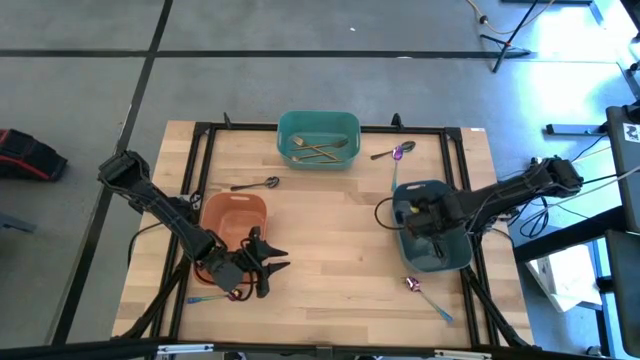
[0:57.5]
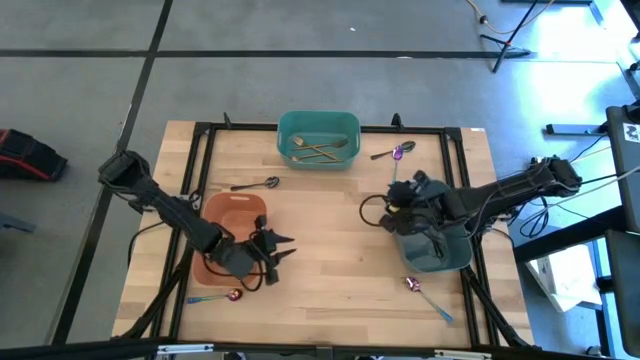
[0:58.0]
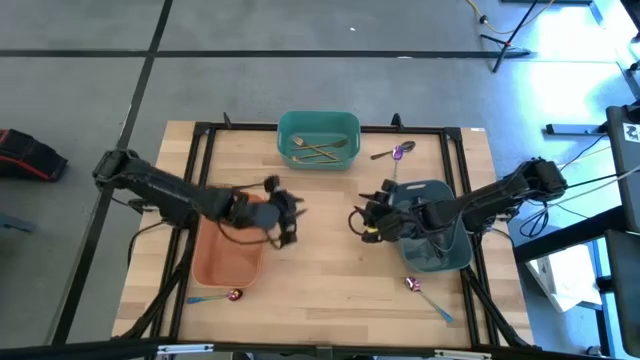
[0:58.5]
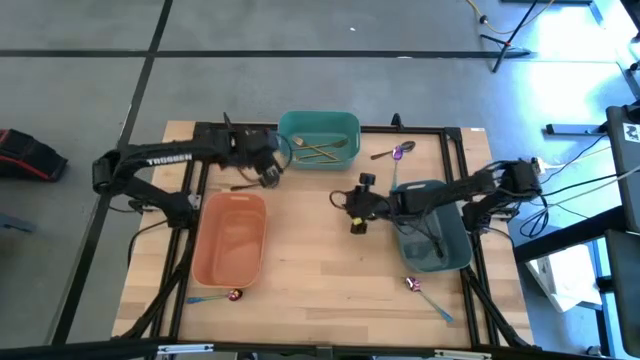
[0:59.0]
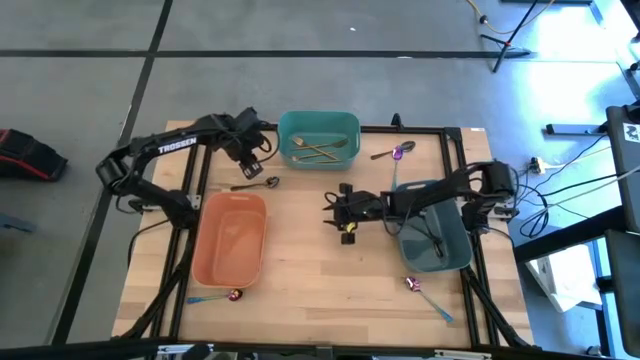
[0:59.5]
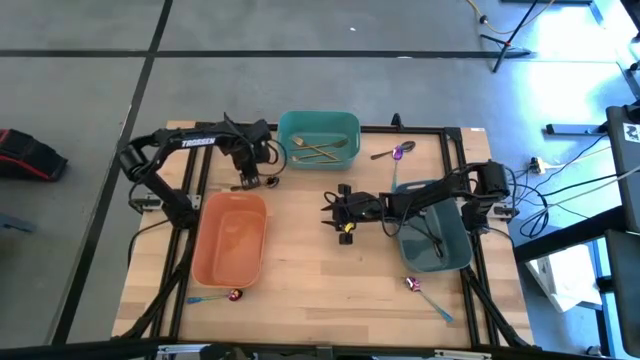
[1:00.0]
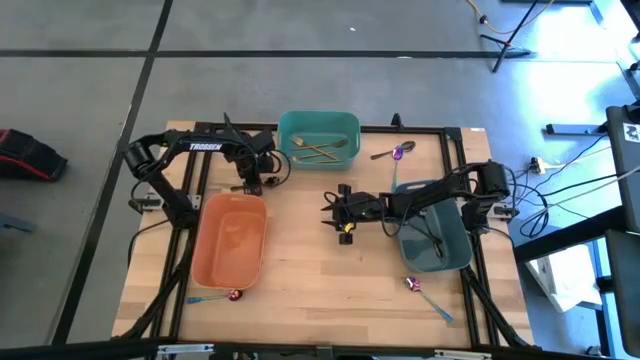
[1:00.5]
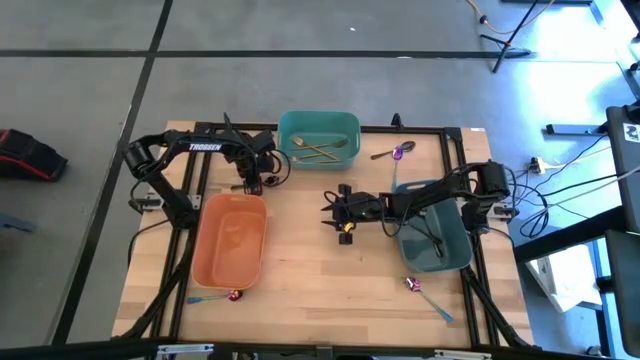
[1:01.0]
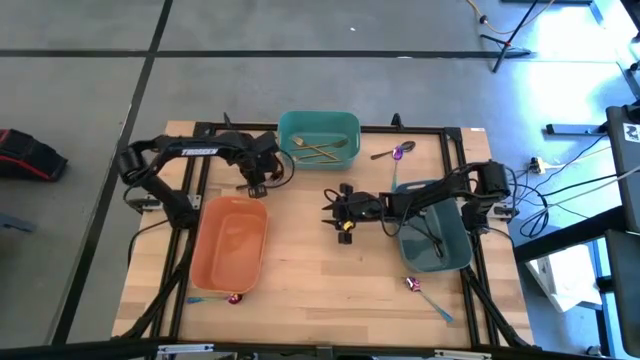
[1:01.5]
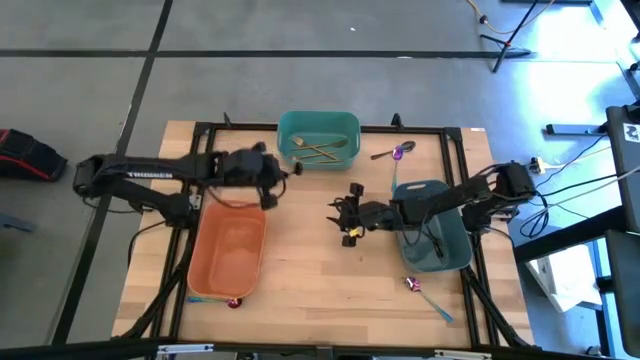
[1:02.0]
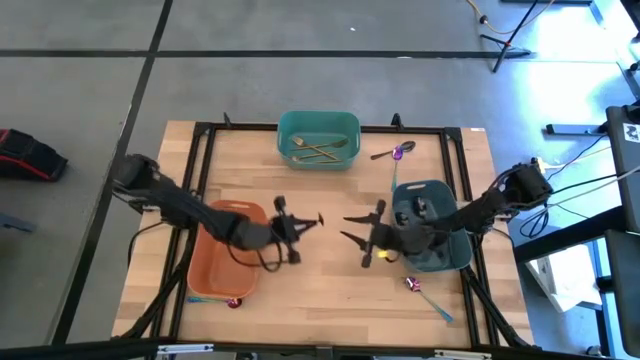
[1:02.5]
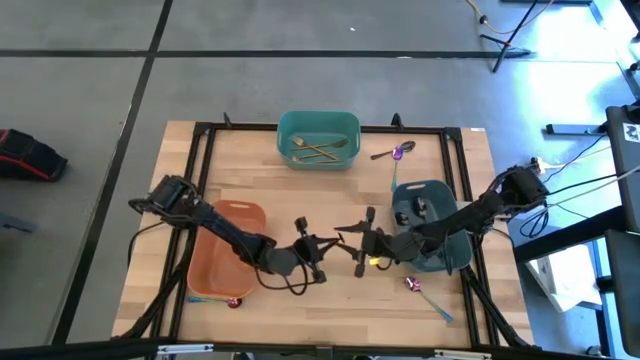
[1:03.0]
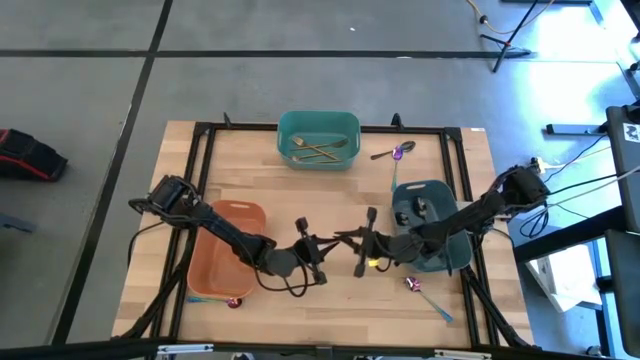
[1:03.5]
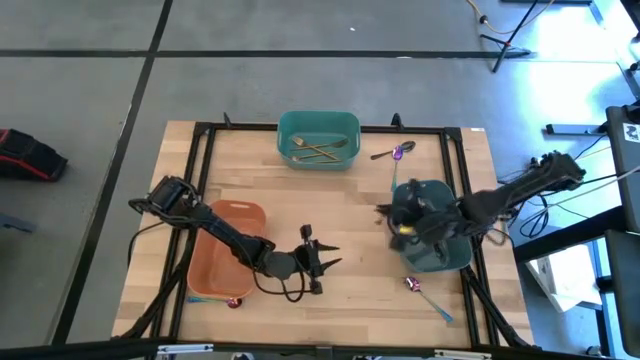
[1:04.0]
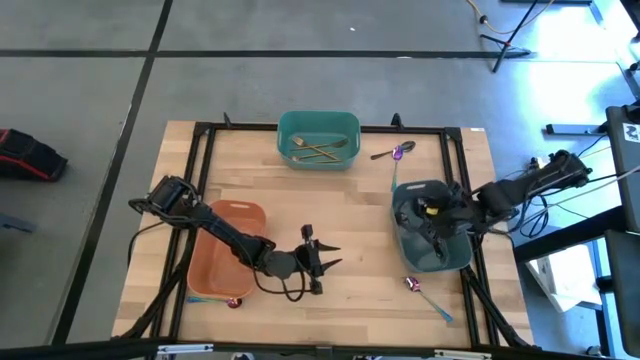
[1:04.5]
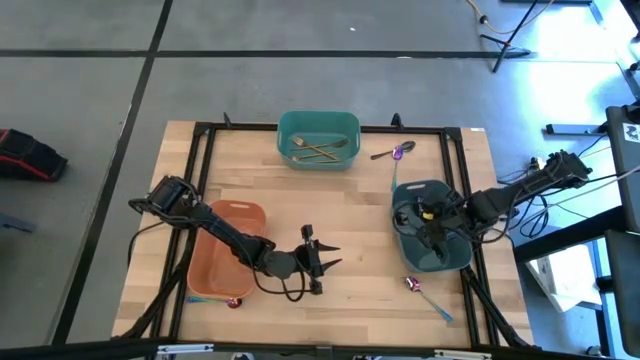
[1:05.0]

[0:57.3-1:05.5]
Task: Sort silverware by color (type)
Put the black spoon into the blue bin

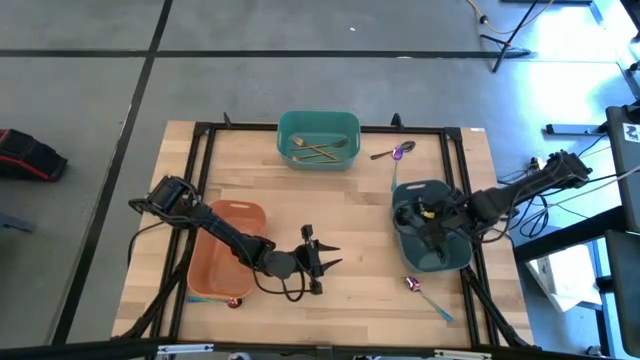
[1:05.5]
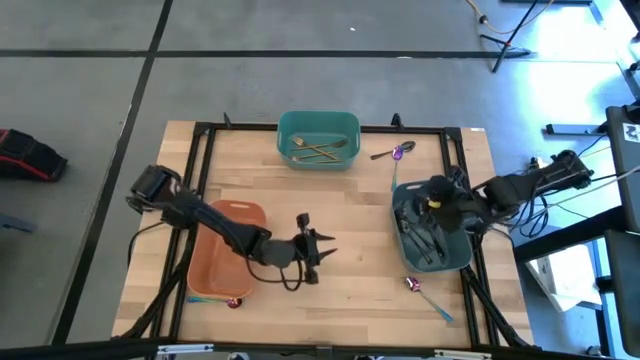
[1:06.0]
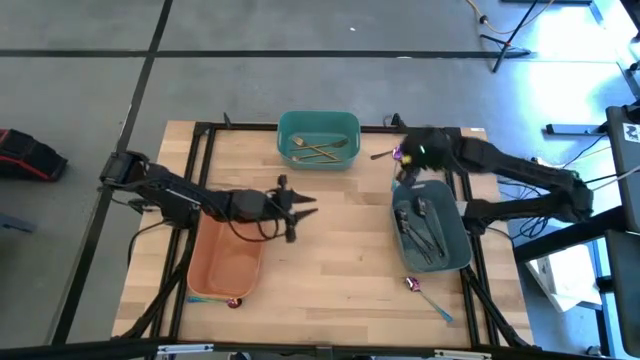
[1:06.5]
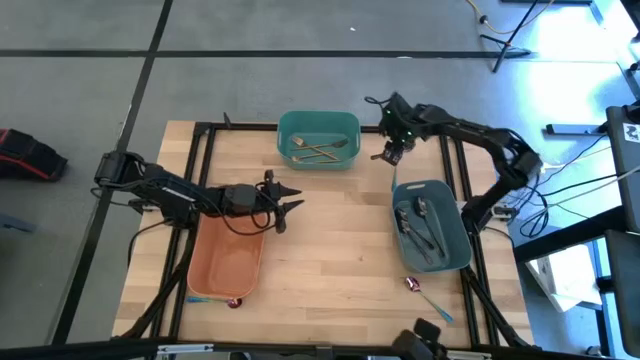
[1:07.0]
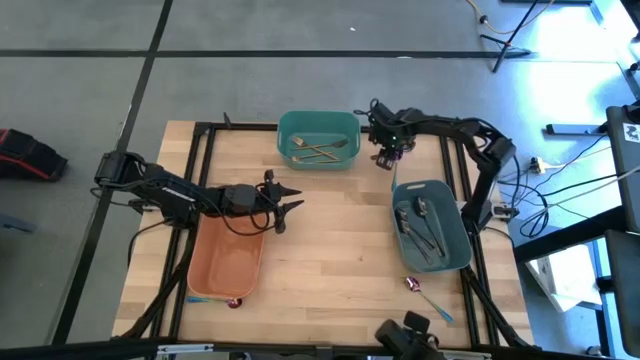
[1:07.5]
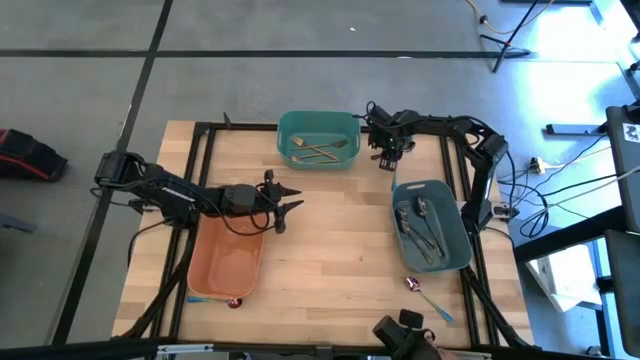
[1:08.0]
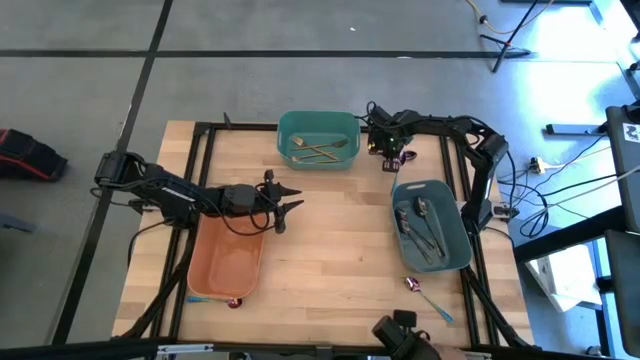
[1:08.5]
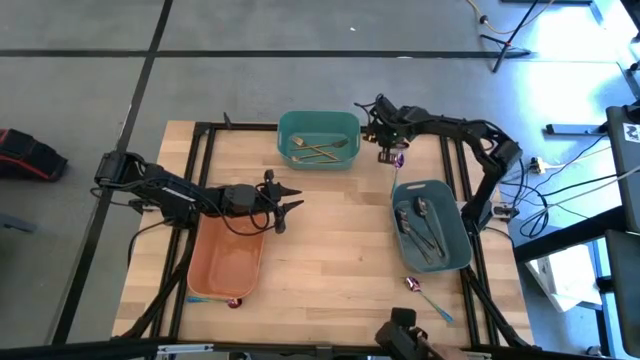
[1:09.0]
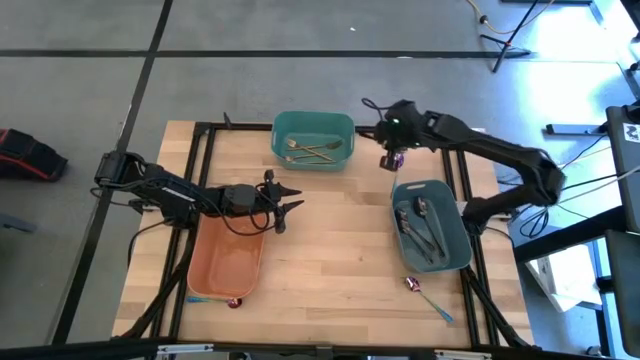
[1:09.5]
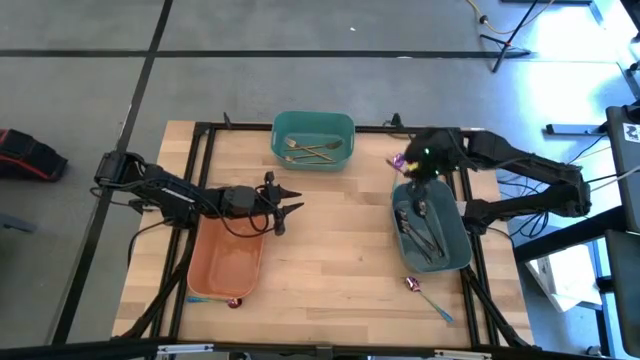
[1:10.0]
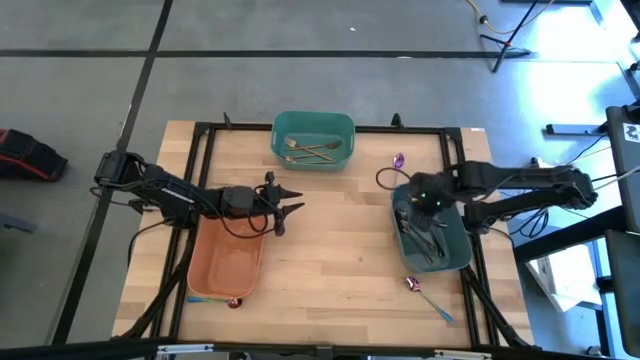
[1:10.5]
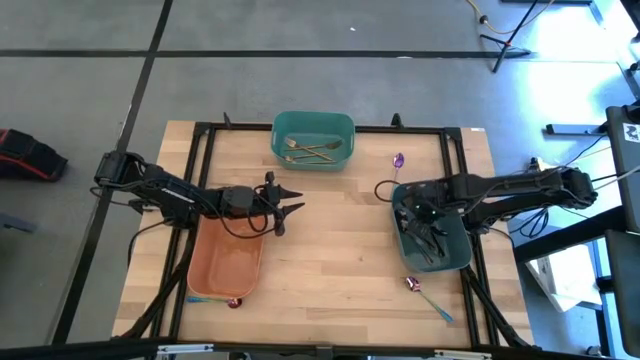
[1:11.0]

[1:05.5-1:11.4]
Put the black spoon into the blue bin

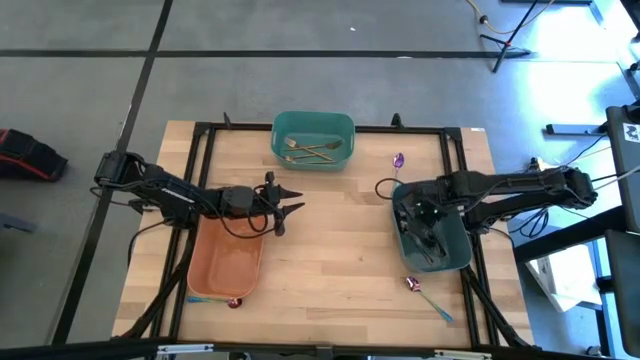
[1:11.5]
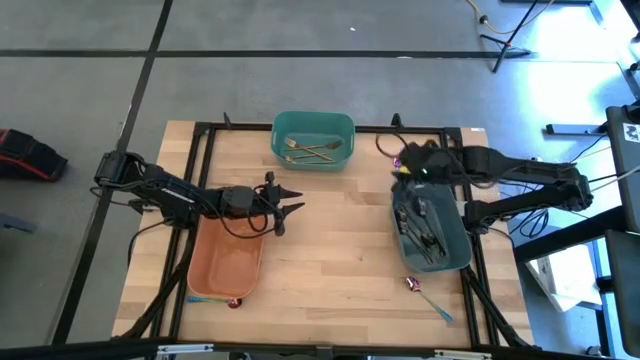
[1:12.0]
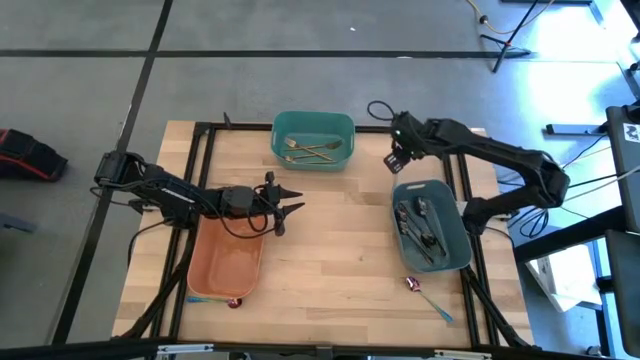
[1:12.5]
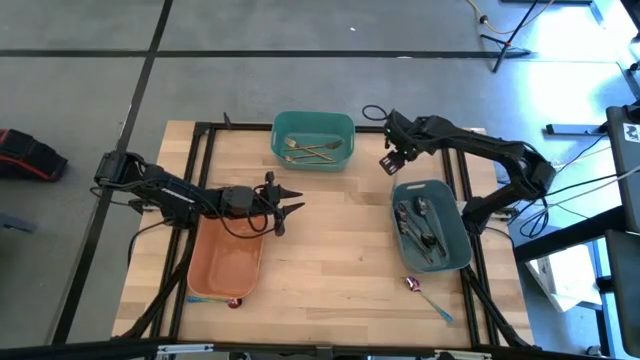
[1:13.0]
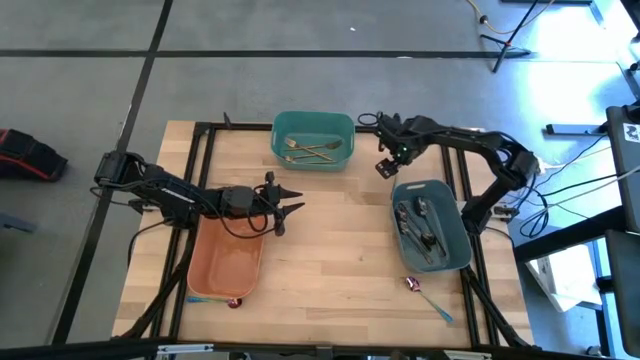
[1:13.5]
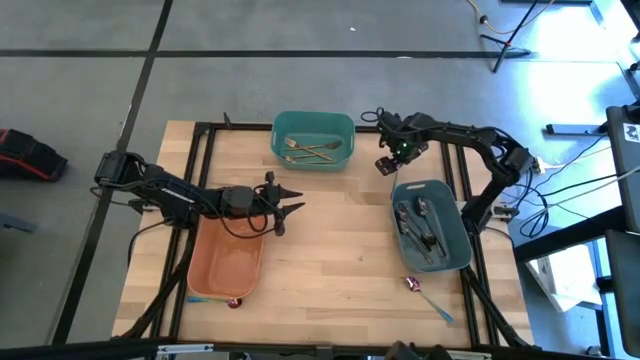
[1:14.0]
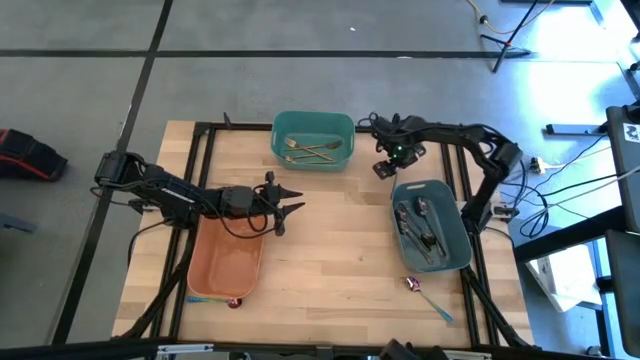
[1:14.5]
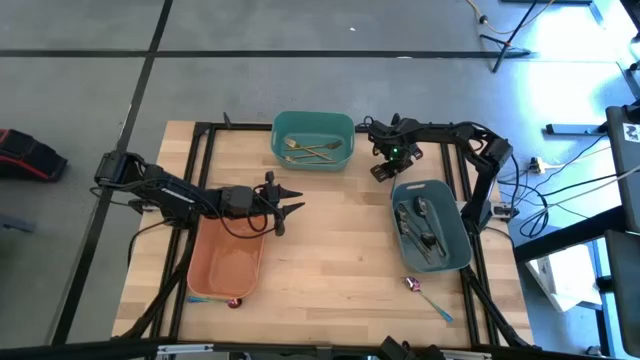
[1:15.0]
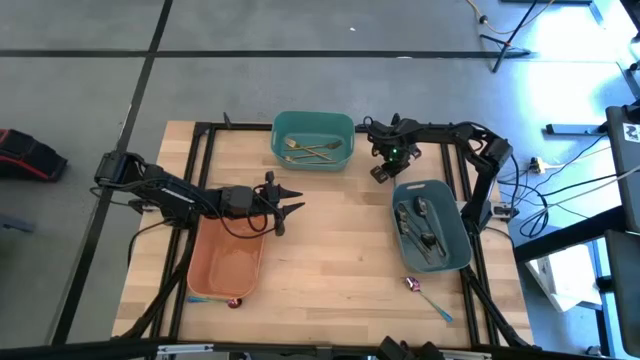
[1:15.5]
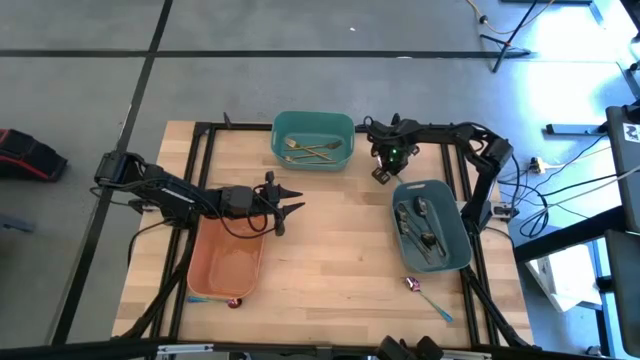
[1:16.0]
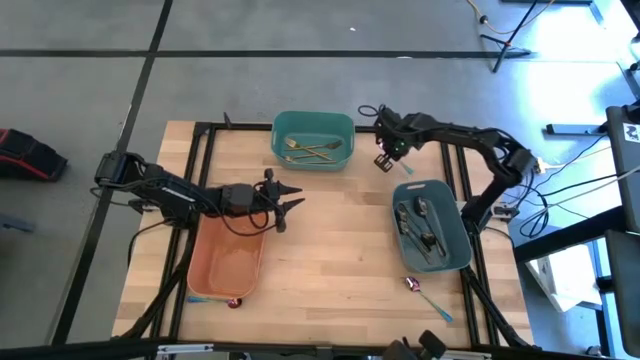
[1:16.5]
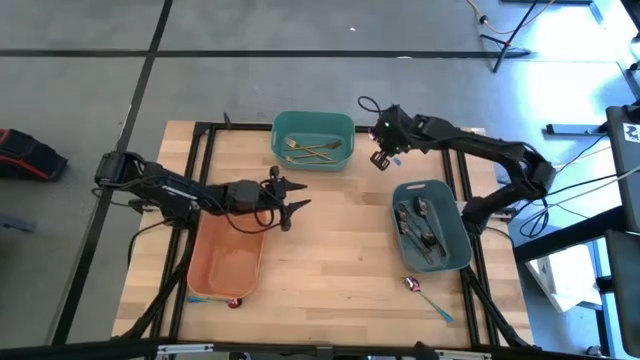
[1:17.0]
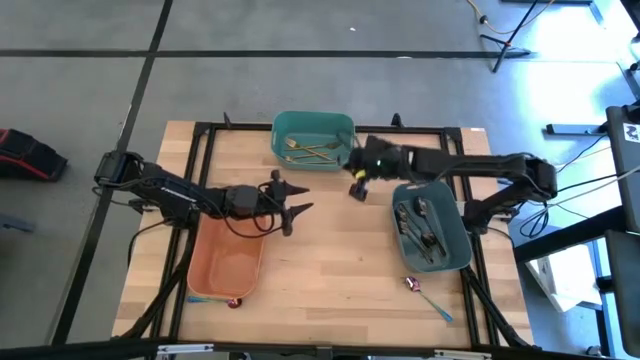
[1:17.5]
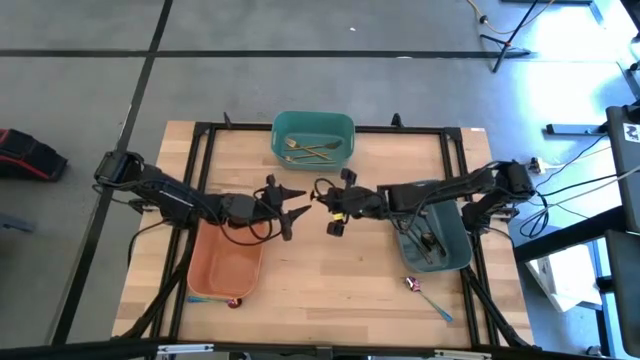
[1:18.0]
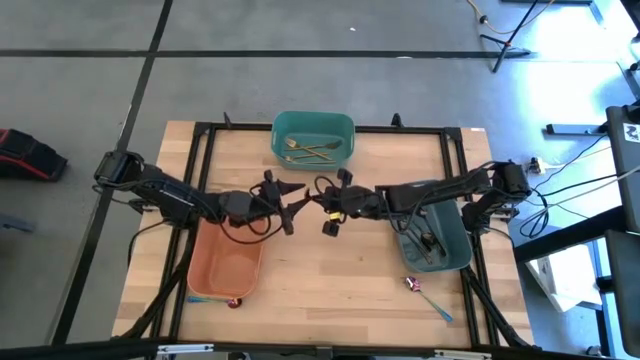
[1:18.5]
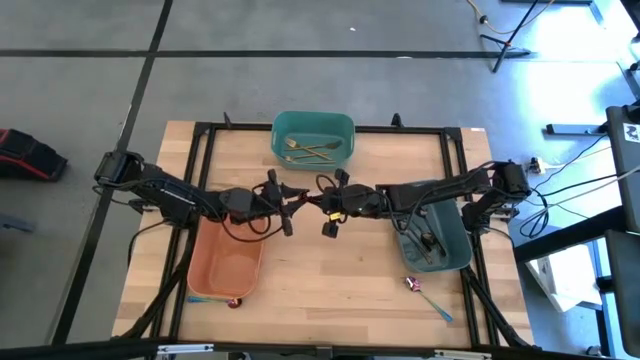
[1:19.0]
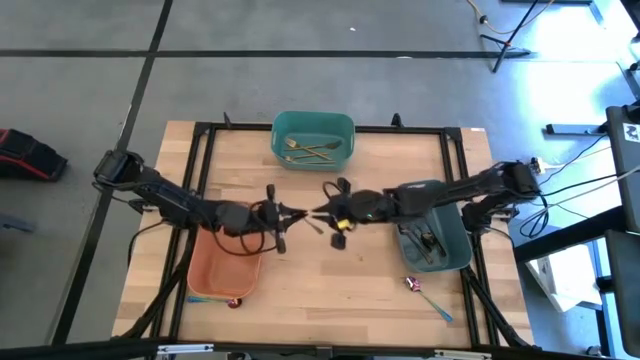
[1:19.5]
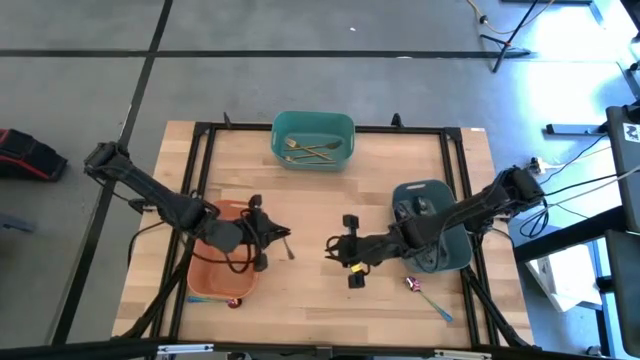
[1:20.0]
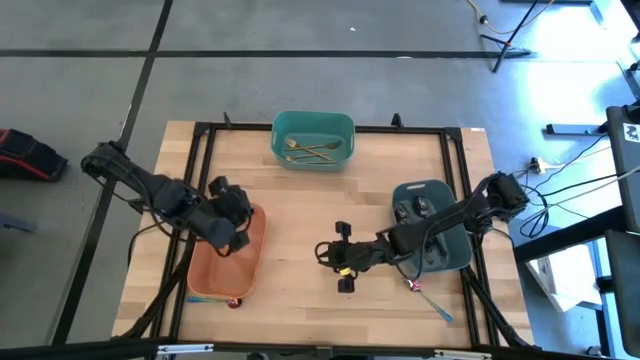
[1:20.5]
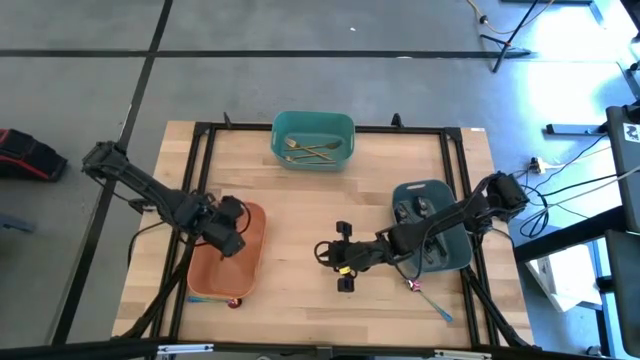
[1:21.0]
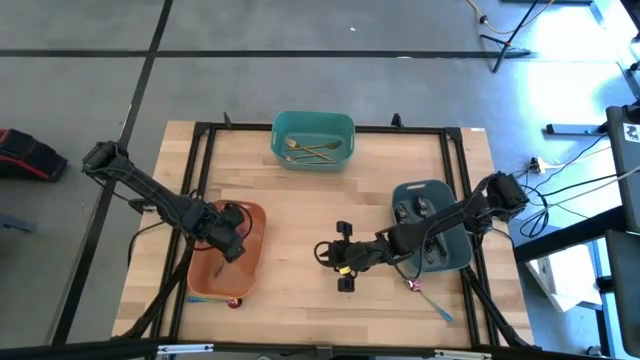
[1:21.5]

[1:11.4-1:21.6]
Put the purple spoon into the orange bin
